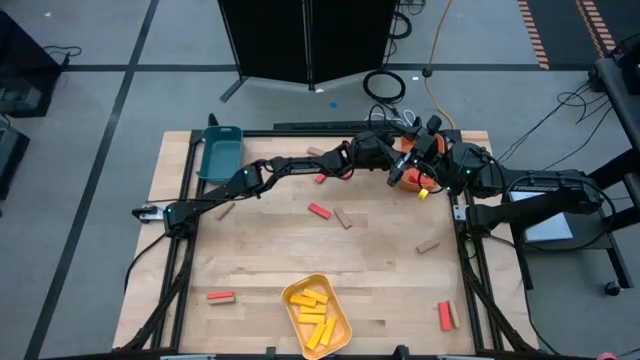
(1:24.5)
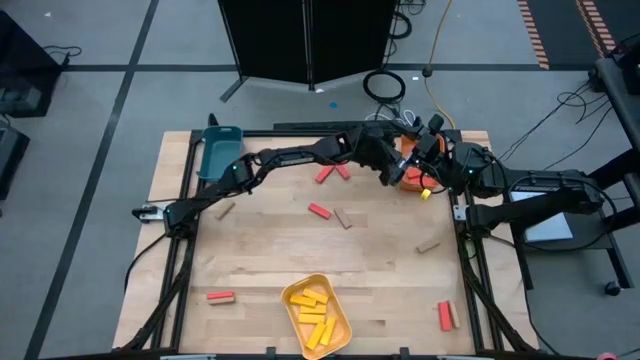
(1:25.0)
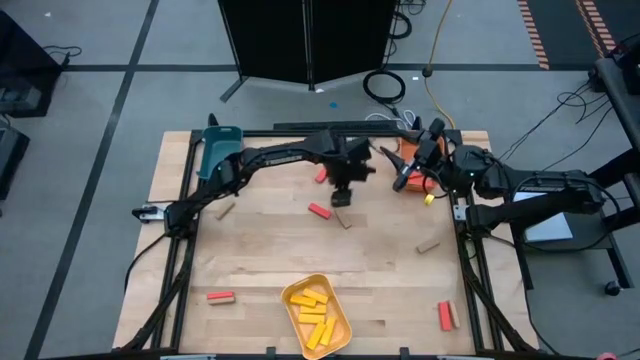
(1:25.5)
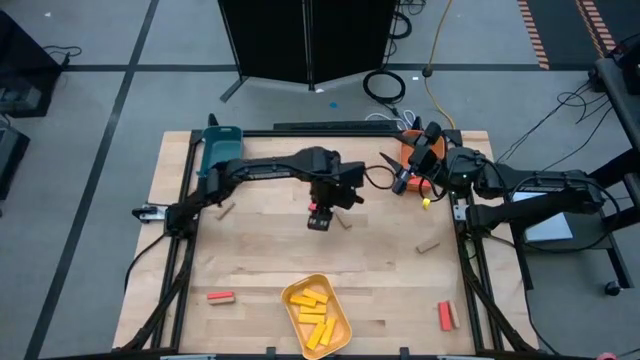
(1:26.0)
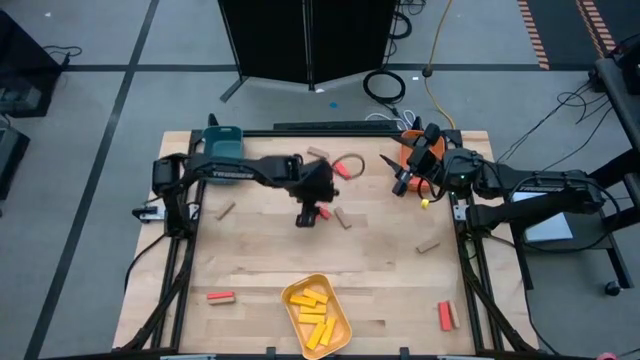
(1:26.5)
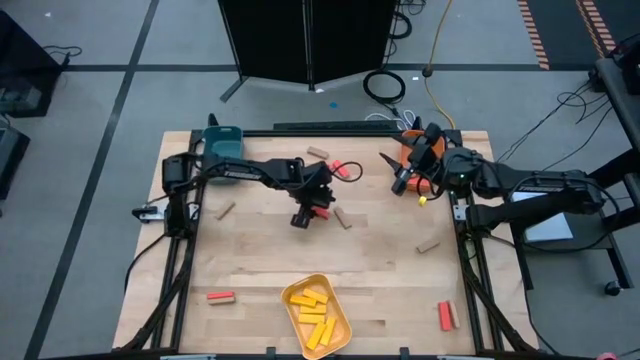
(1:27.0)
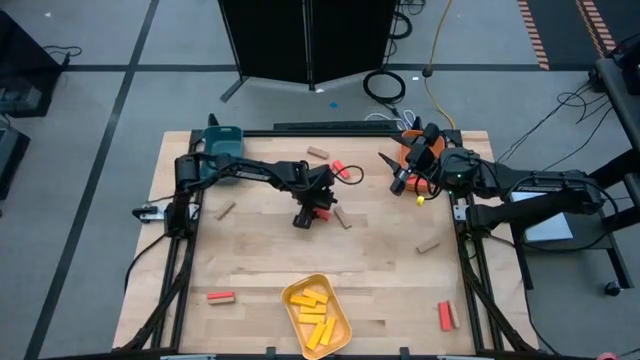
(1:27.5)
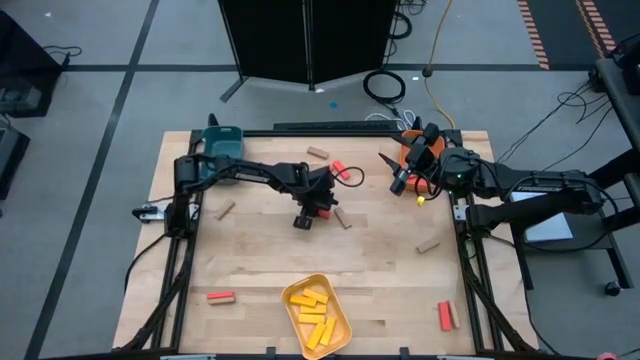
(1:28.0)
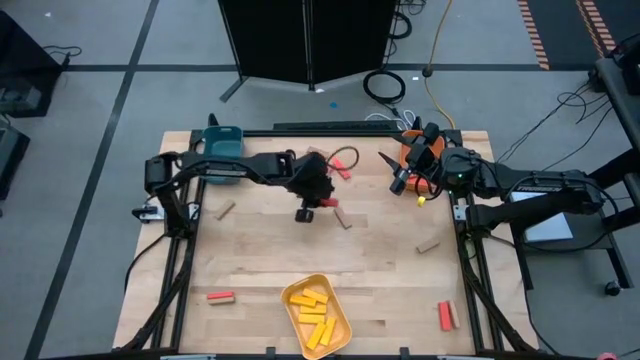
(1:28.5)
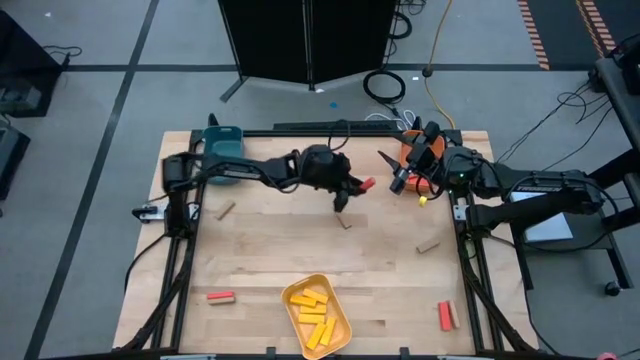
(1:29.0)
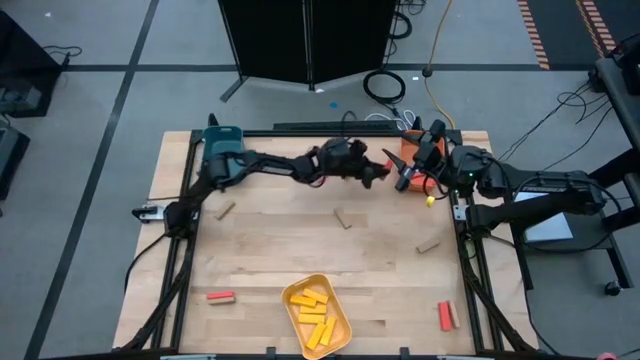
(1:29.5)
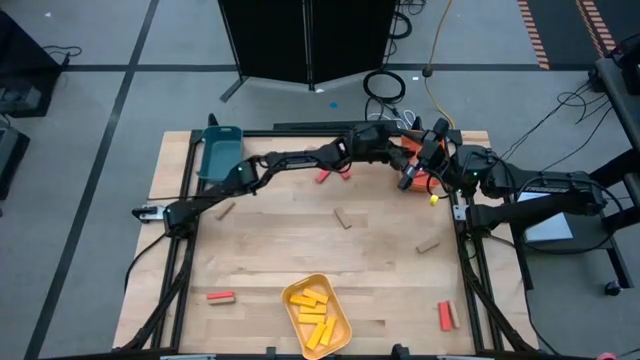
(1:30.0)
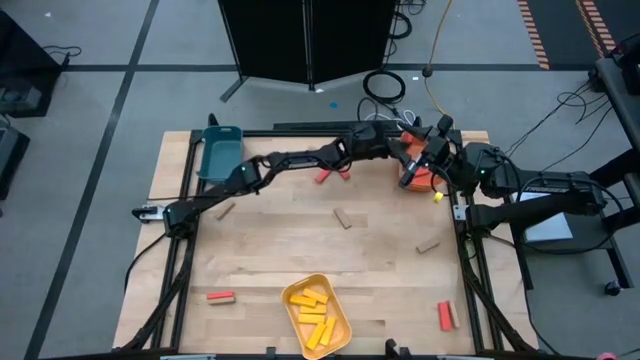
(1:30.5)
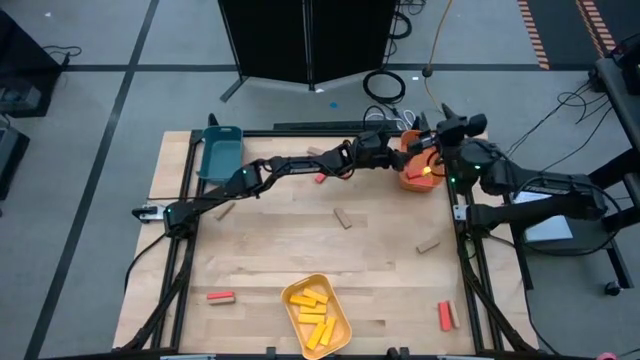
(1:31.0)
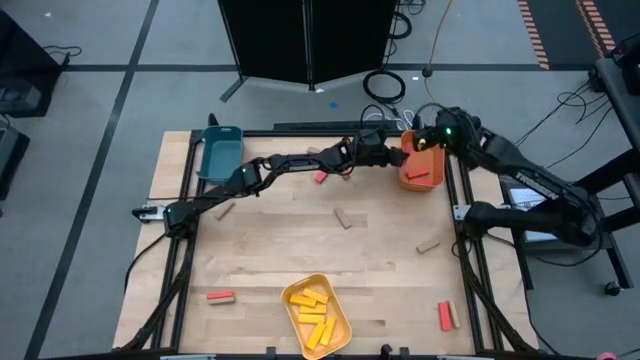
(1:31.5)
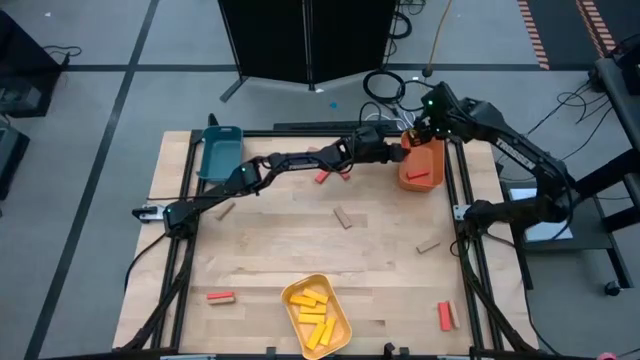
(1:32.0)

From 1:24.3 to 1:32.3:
Task: Sort blocks
Put the red block into the orange bin

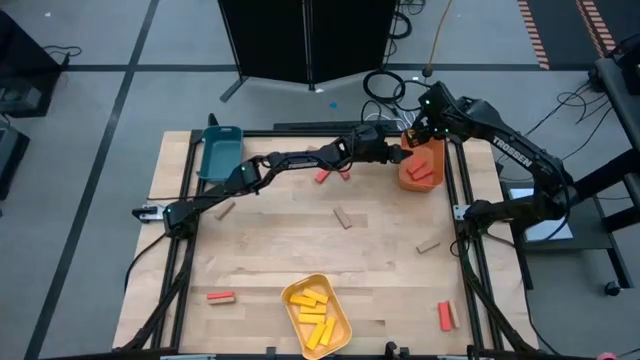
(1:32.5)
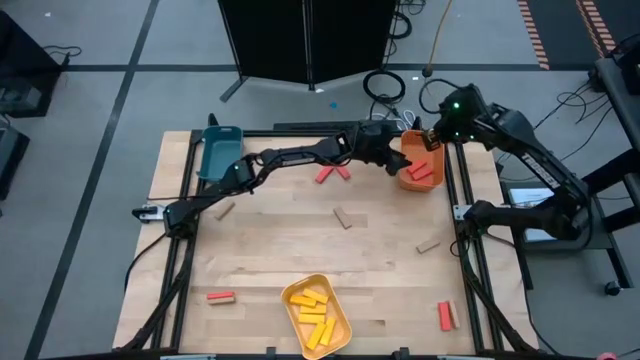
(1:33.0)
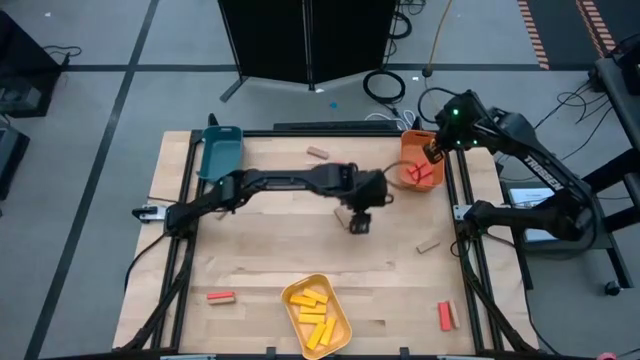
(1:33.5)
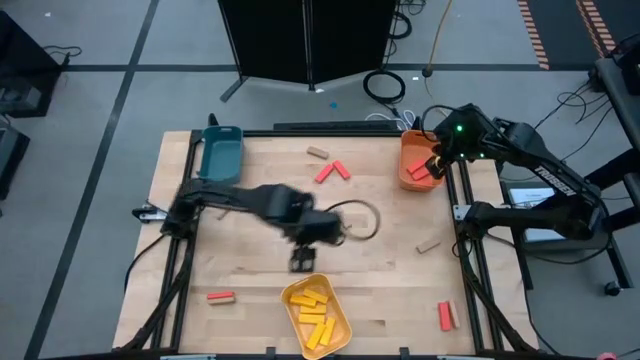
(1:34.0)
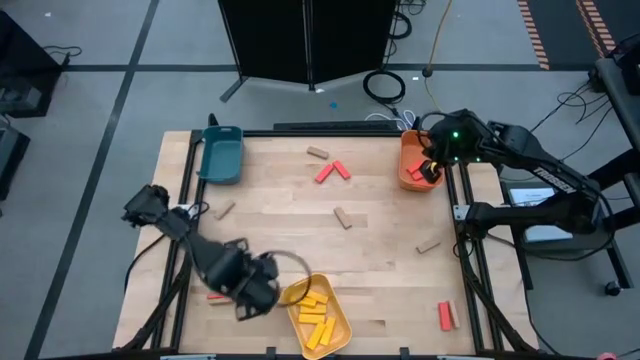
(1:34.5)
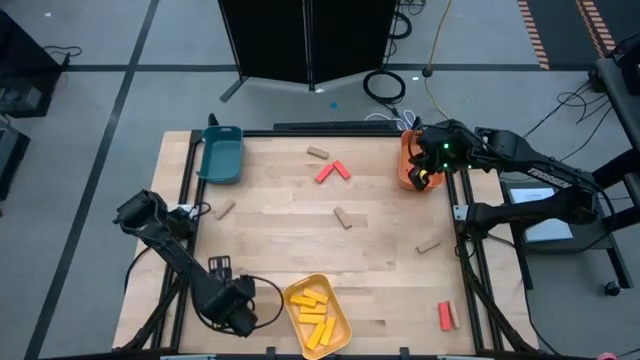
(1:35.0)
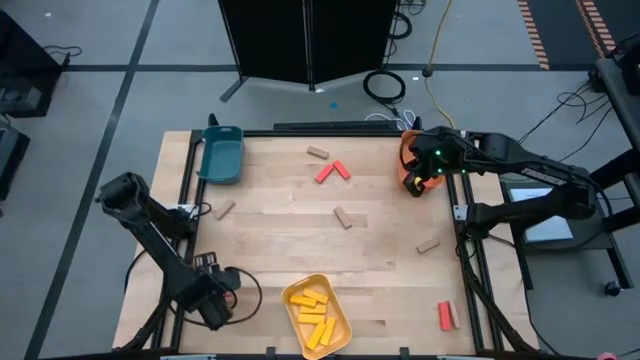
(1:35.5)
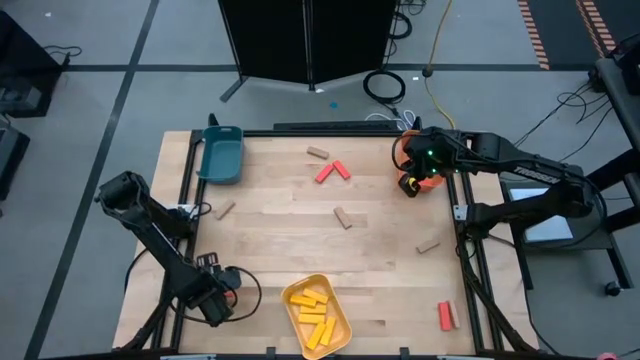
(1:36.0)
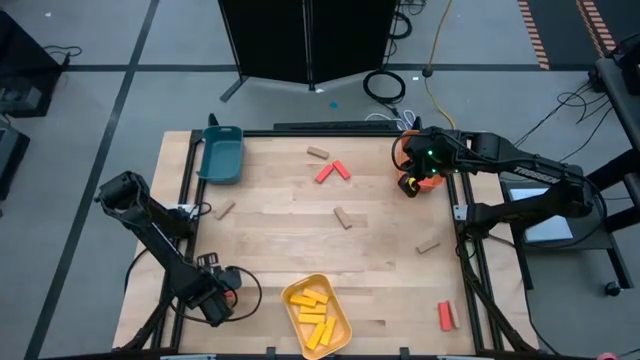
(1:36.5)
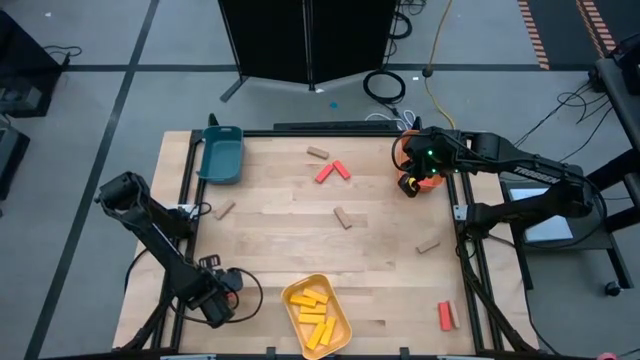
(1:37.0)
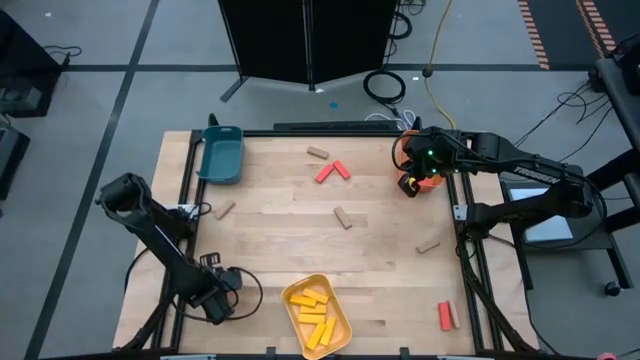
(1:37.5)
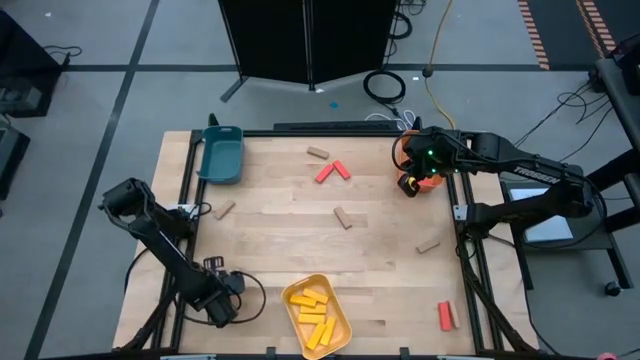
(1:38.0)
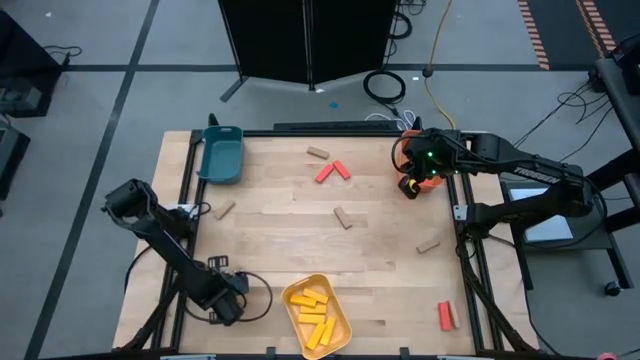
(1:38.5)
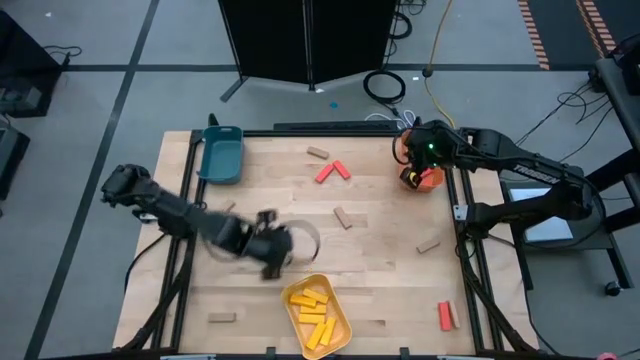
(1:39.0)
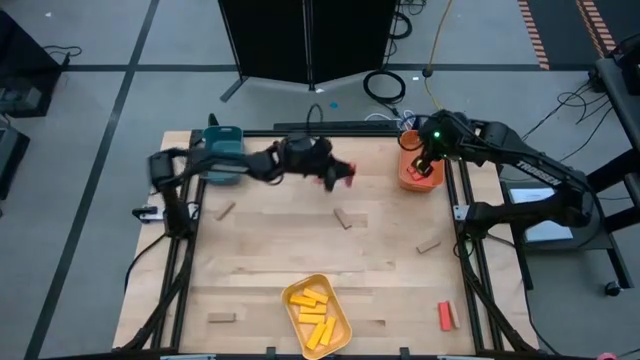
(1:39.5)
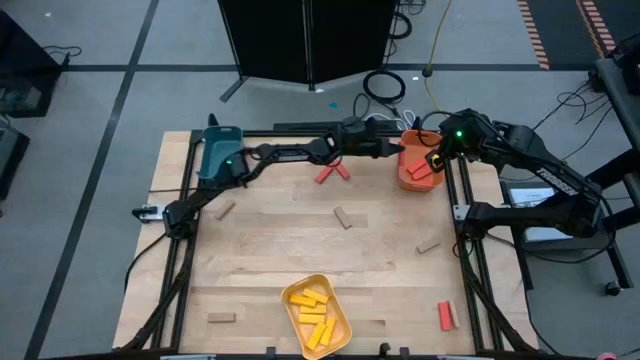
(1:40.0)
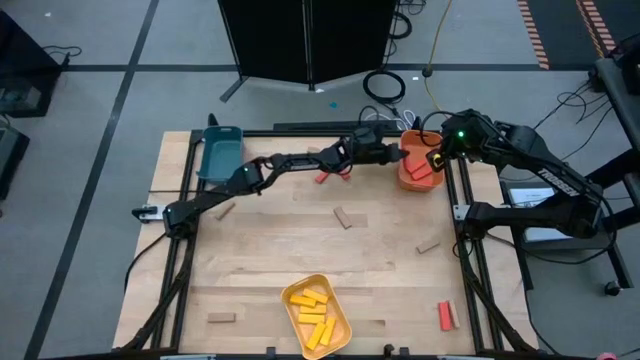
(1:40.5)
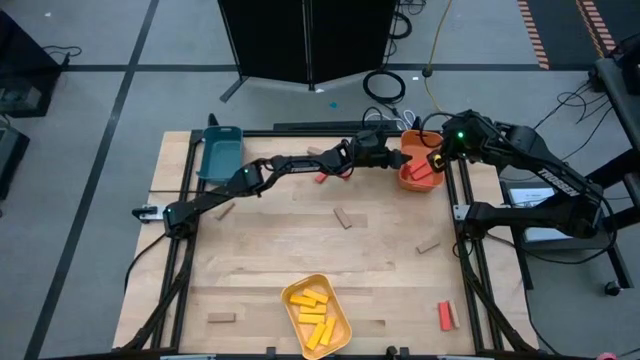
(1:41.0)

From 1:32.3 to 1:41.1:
Put the red block into the orange bin

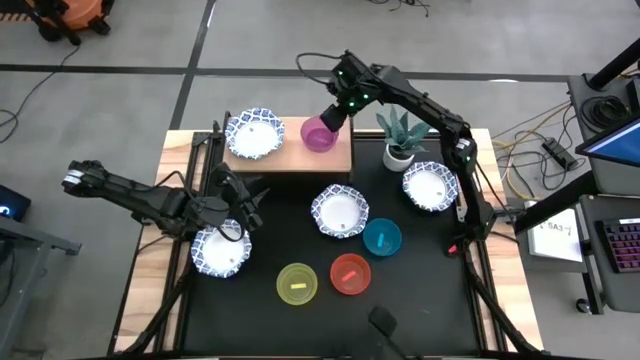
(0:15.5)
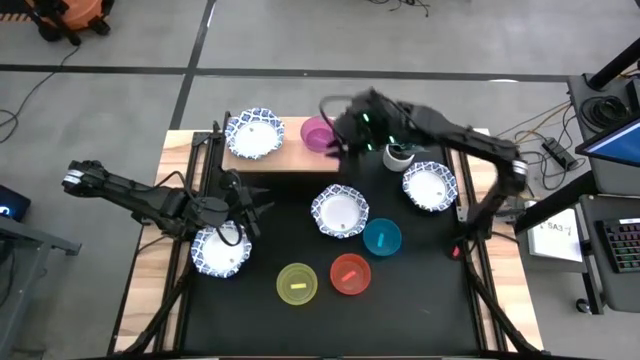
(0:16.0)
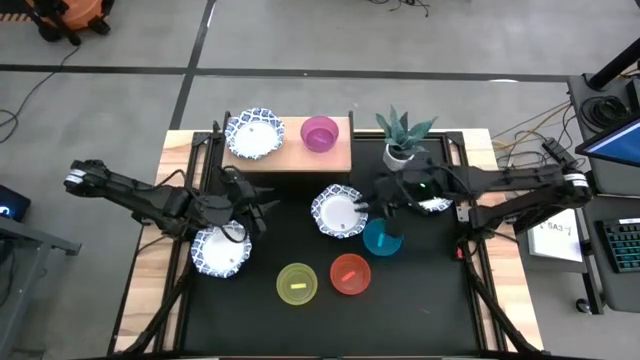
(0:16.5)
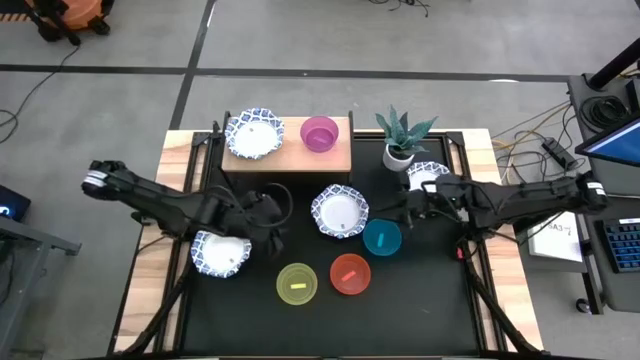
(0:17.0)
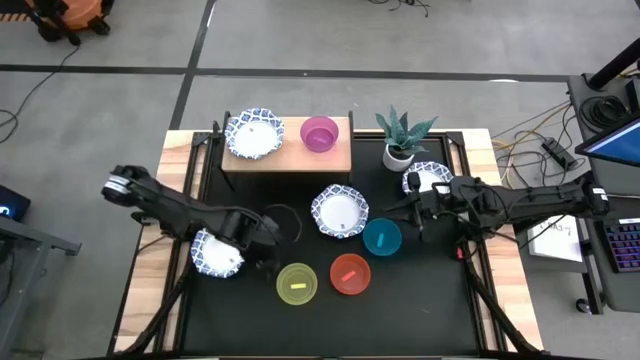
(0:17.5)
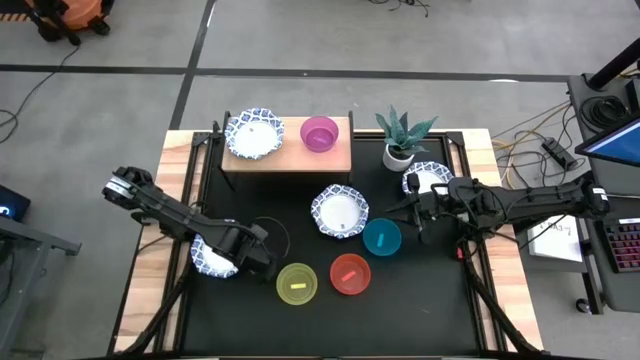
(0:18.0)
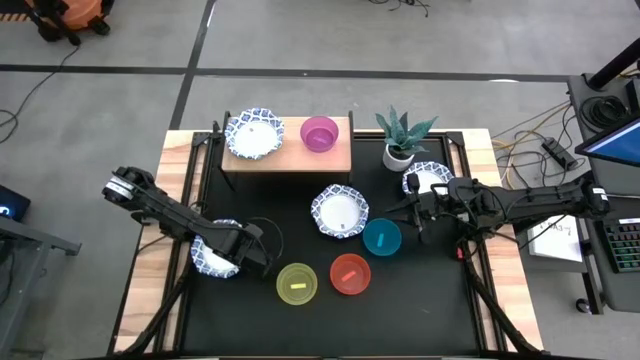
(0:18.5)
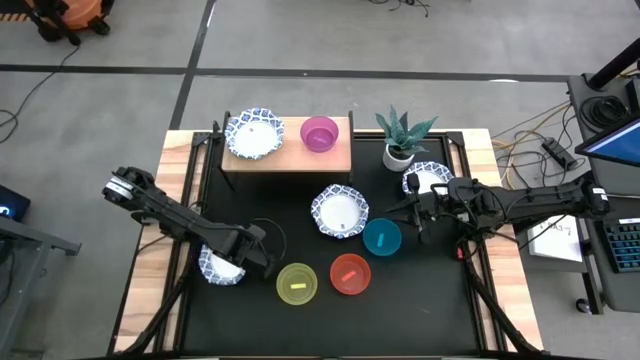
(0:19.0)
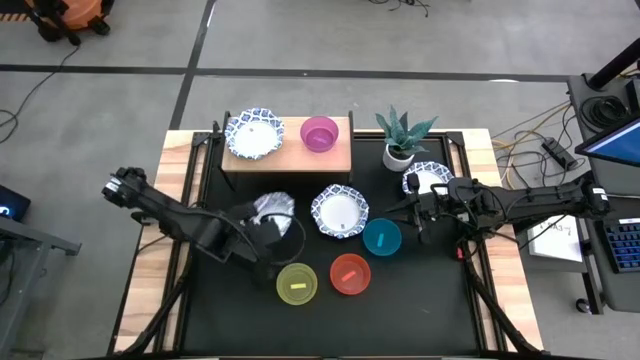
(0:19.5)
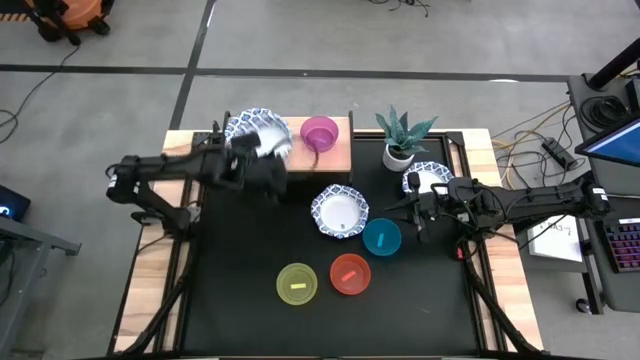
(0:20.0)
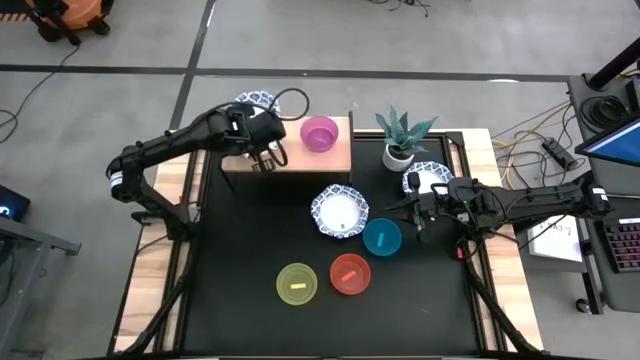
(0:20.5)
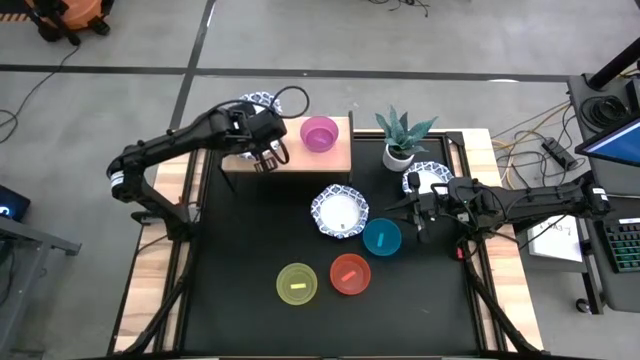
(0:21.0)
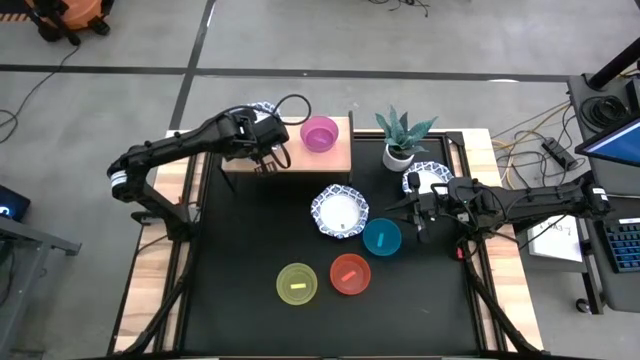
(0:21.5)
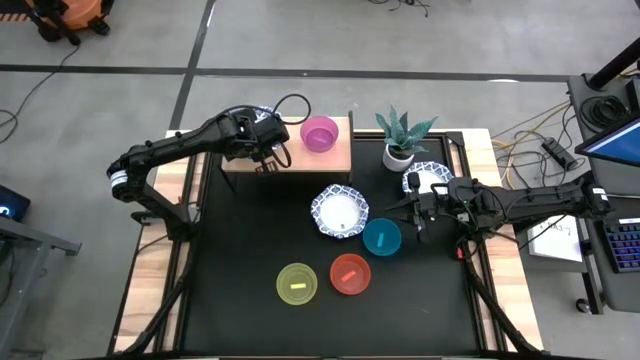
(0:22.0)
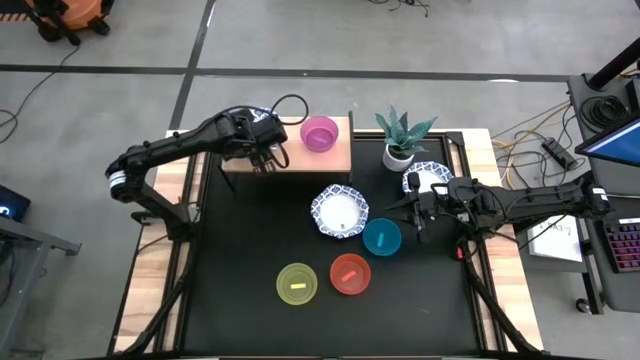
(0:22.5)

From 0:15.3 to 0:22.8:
Task: Place and stack bowls onto a shelf
Stack the blue patterned bowl on top of the blue patterned bowl on the shelf
